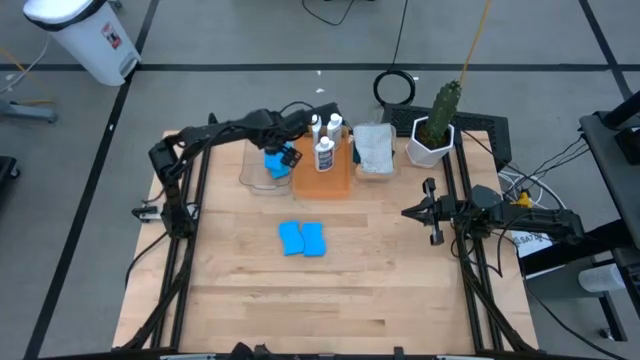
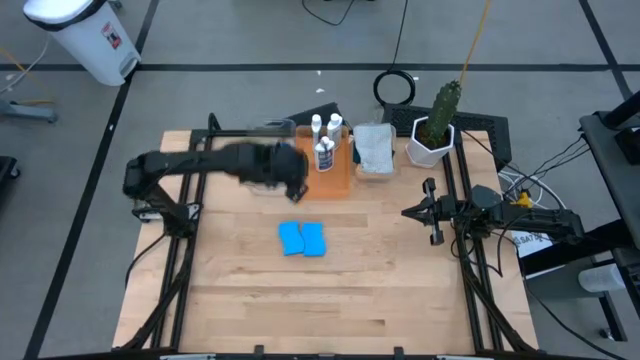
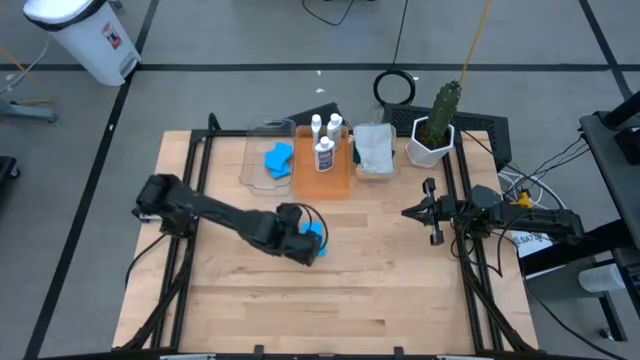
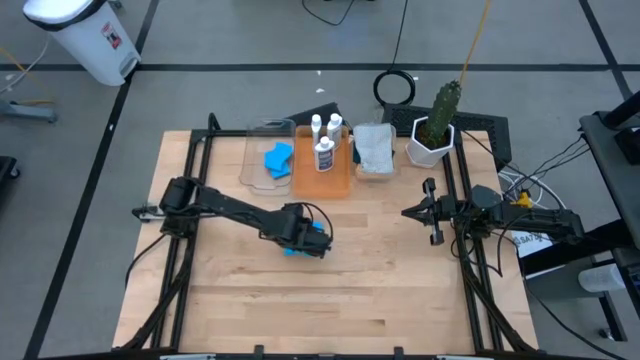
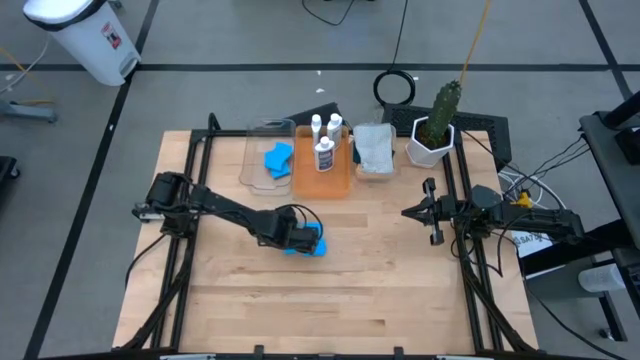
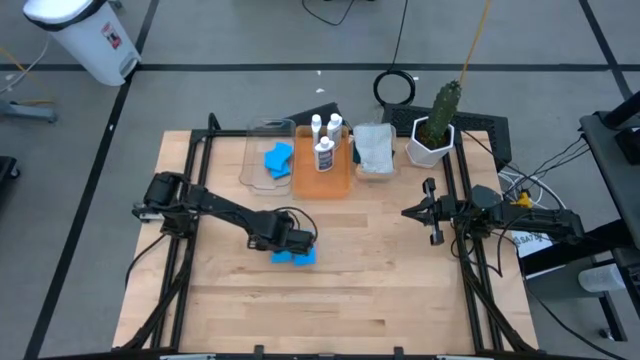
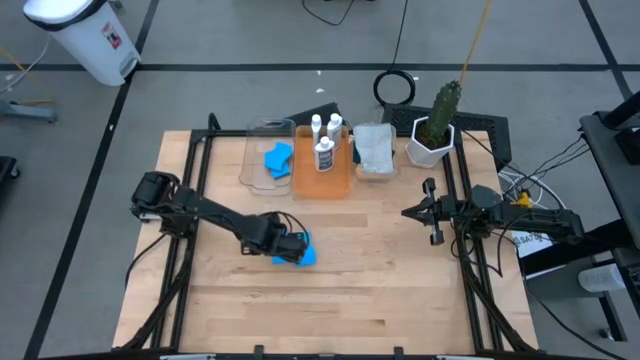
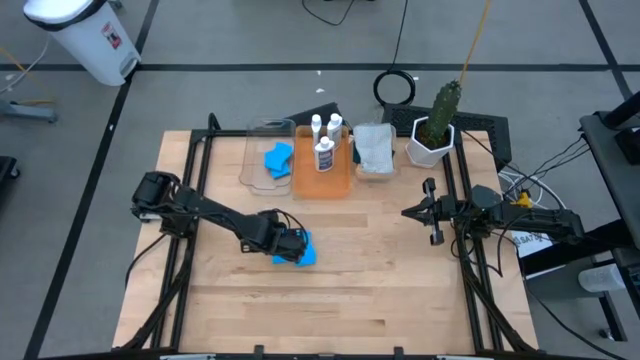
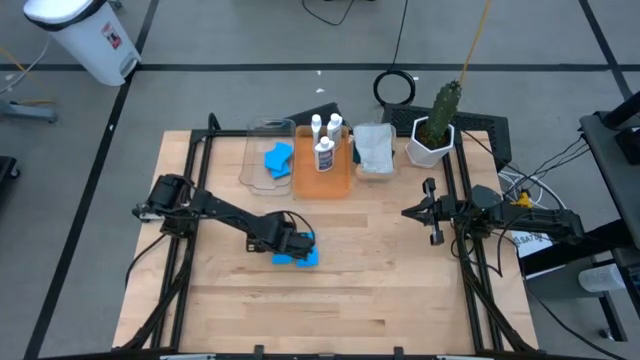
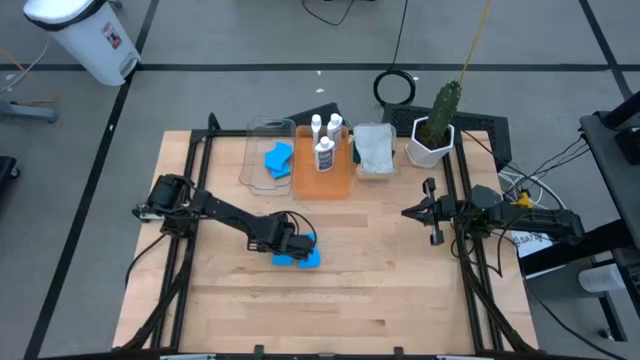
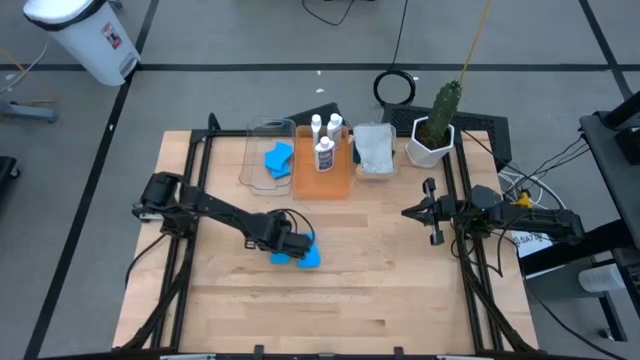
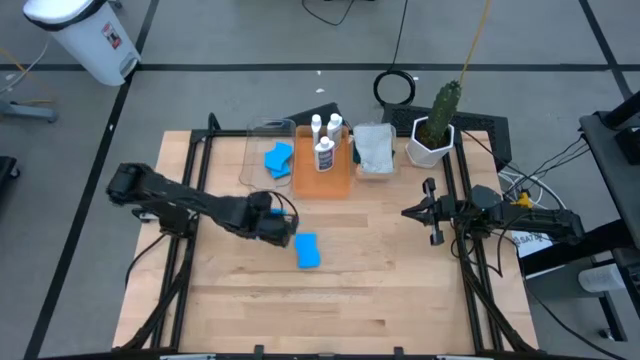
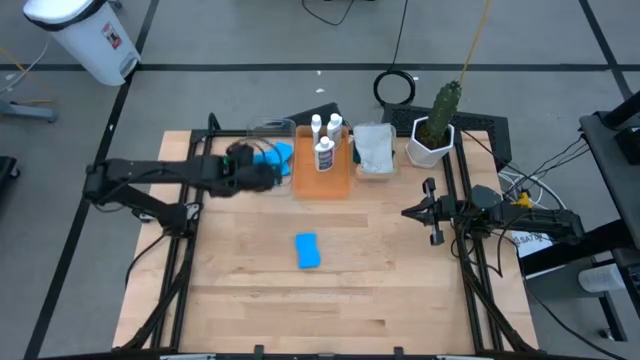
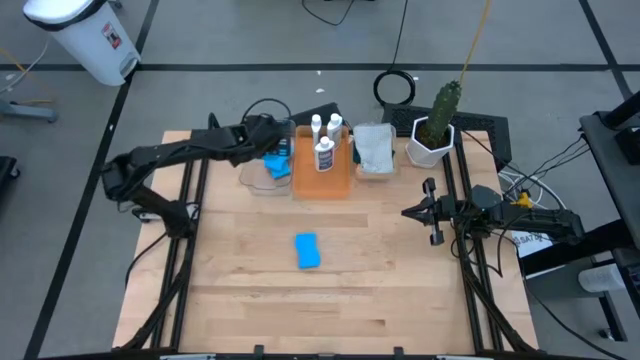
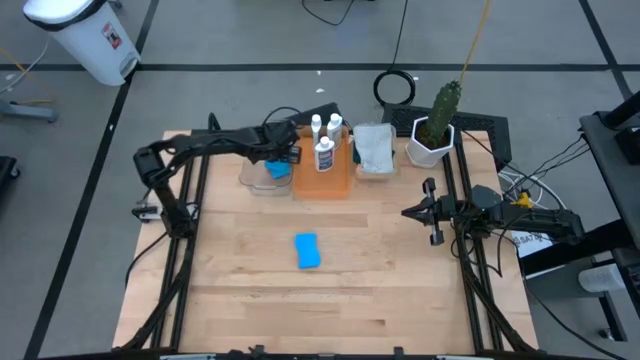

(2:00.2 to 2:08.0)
Task: Pick & Place Kitchen Items
Put the blue sponge into the transparent bin

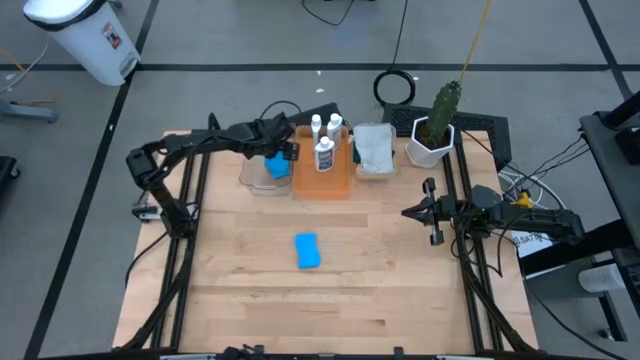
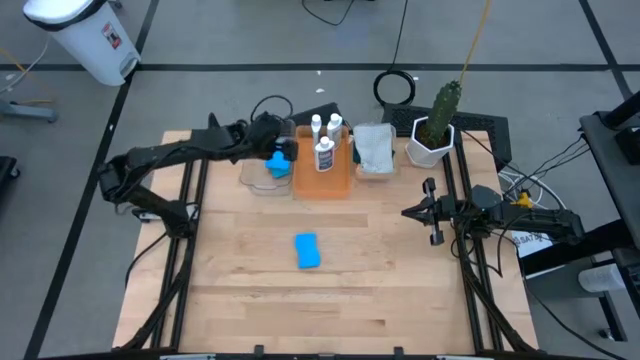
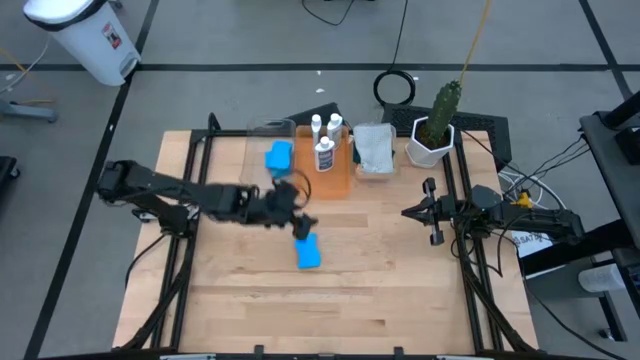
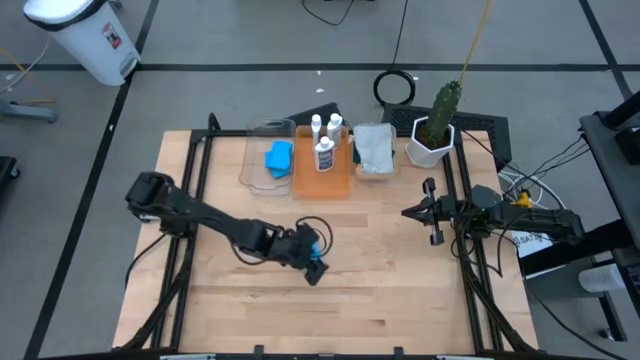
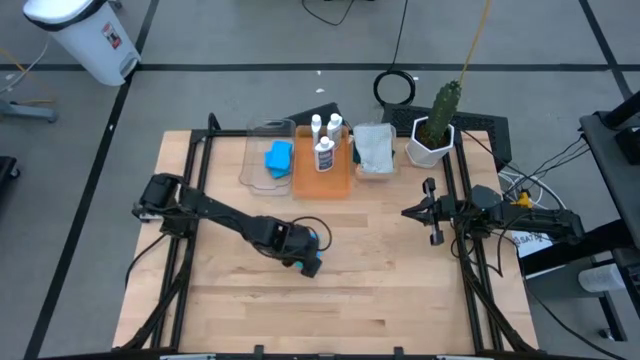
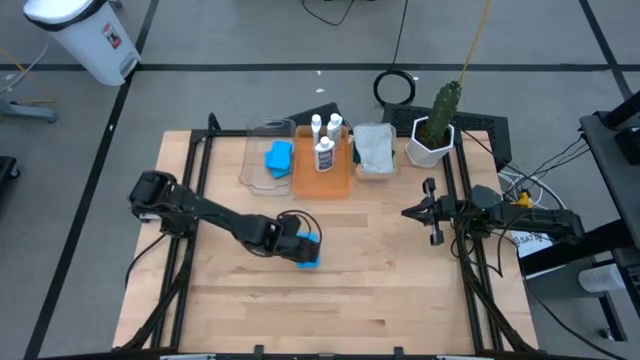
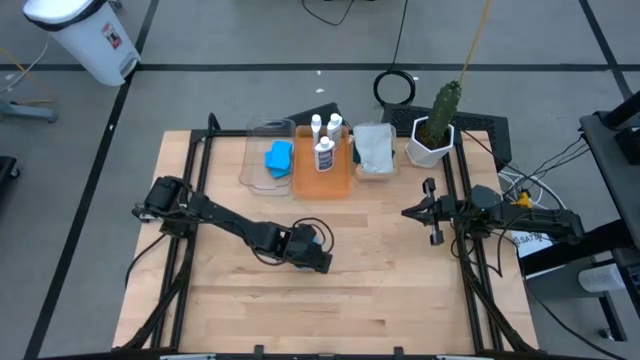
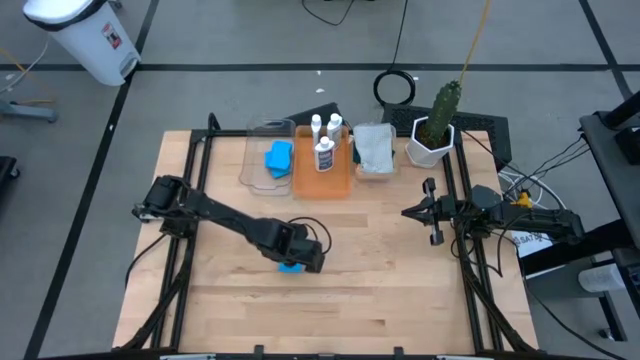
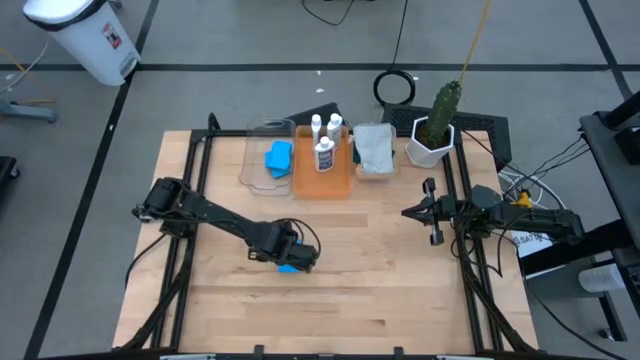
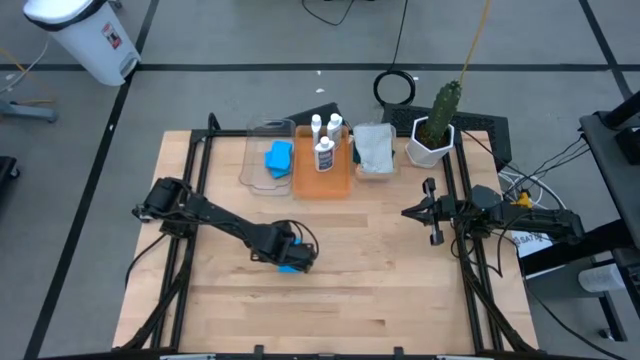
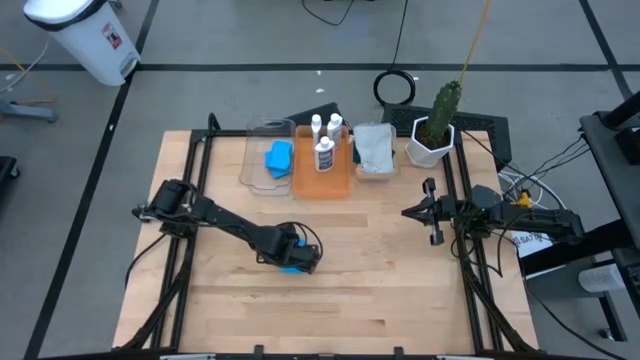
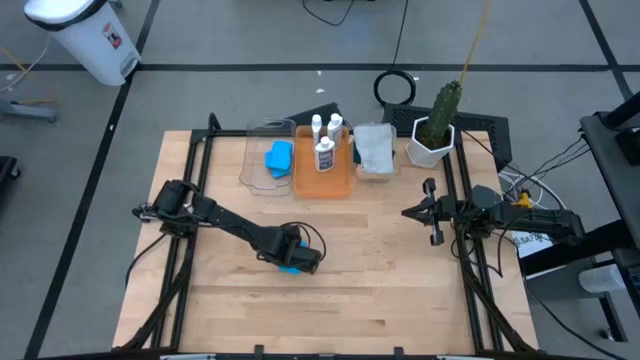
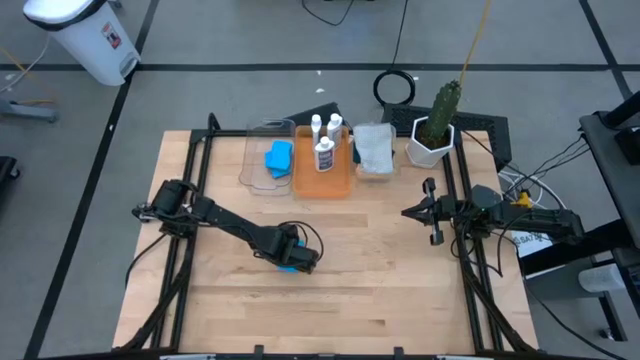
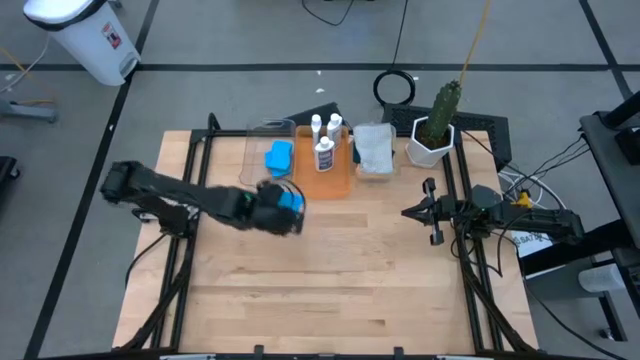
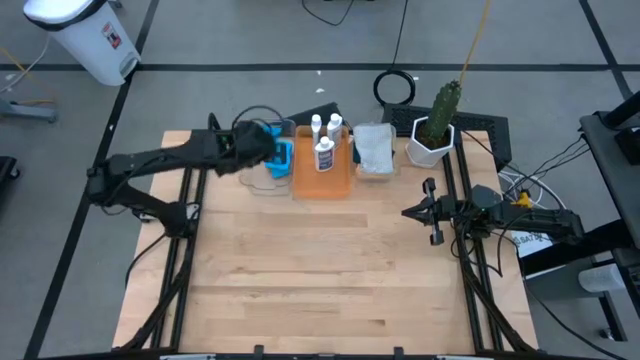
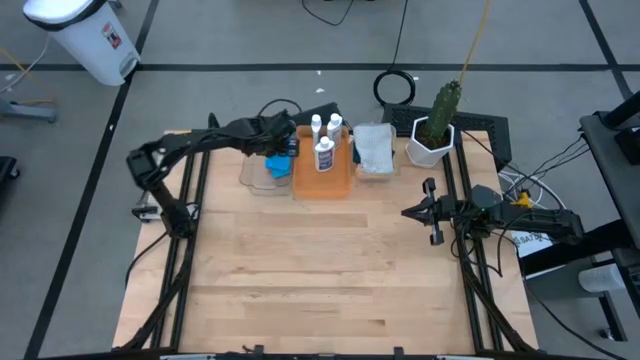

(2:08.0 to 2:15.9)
Put the blue sponge into the transparent bin

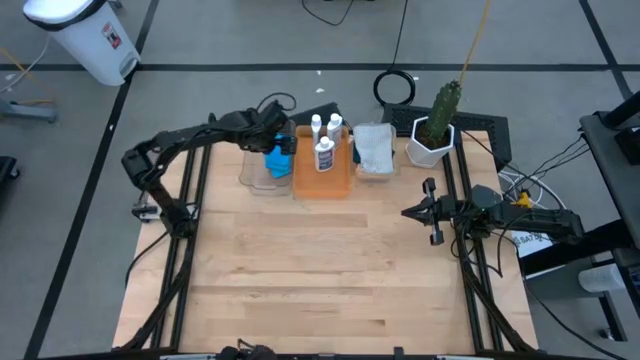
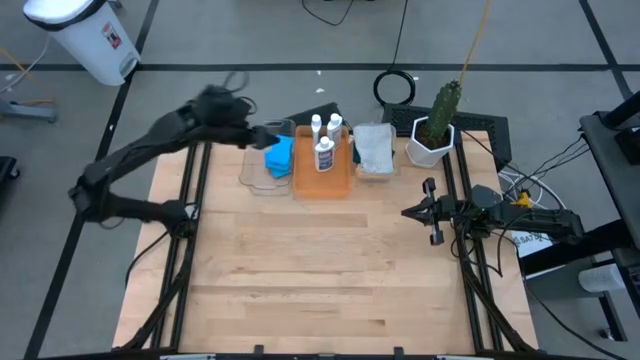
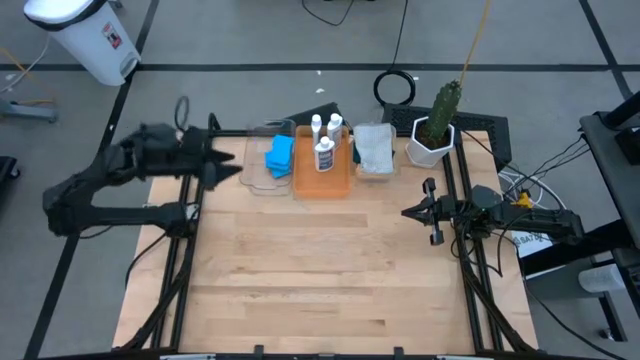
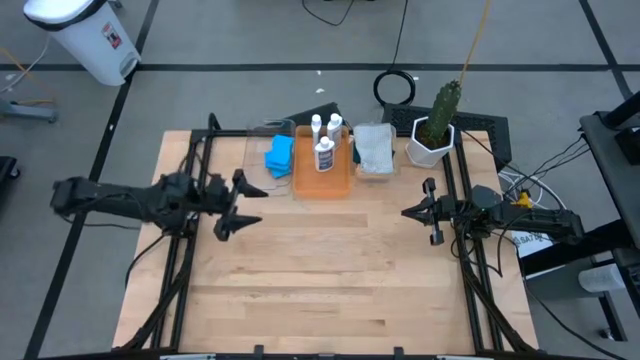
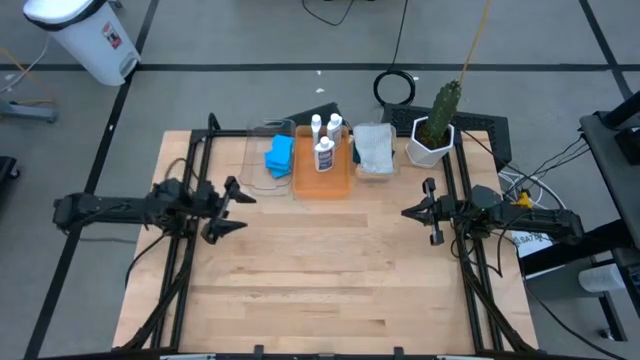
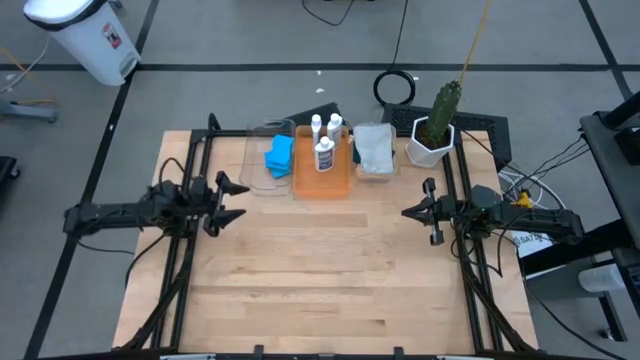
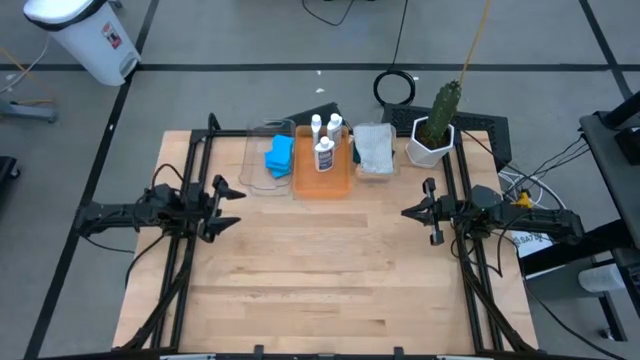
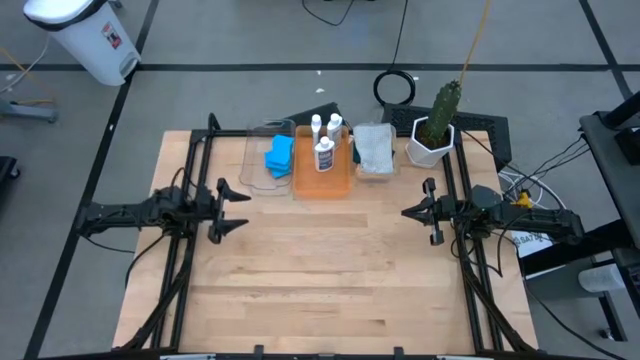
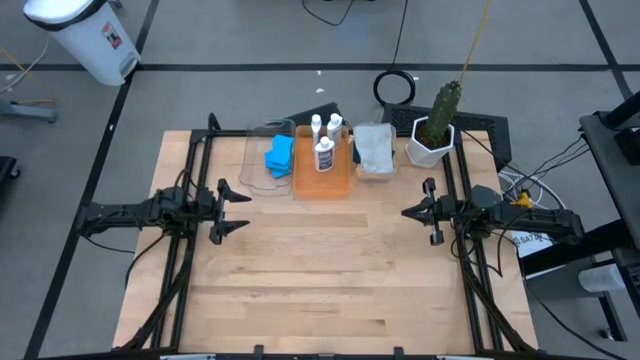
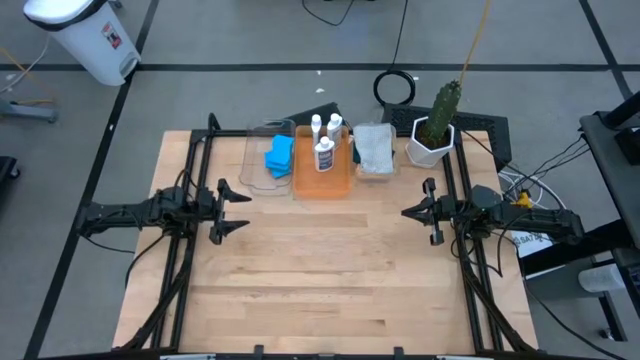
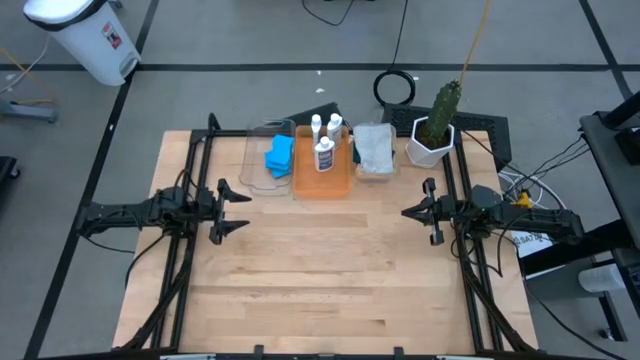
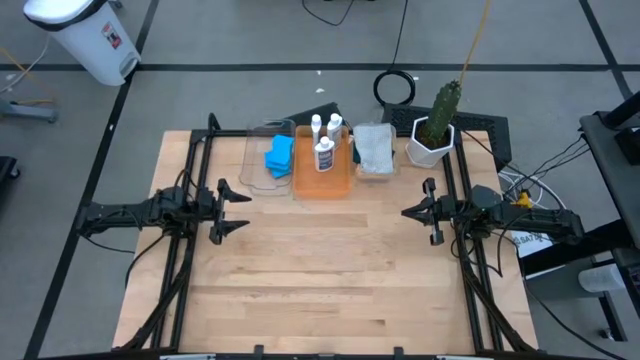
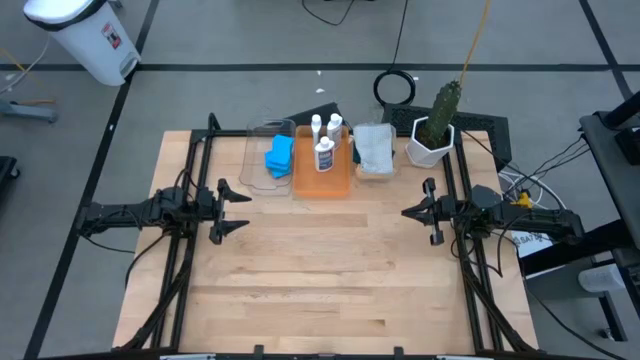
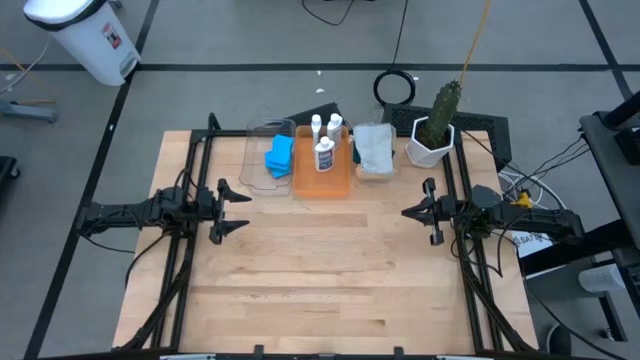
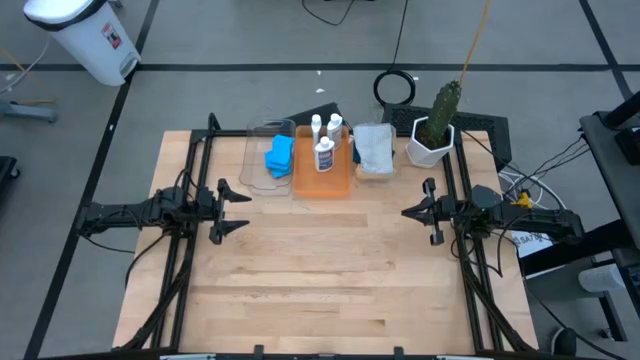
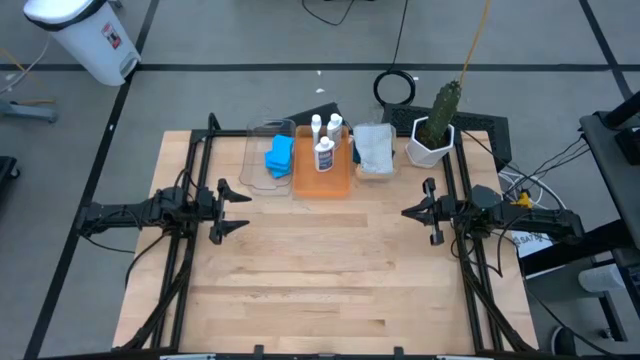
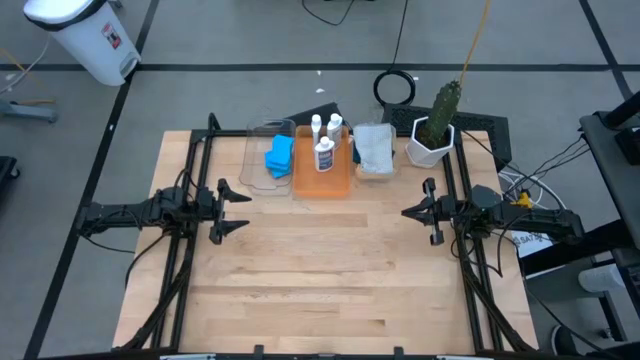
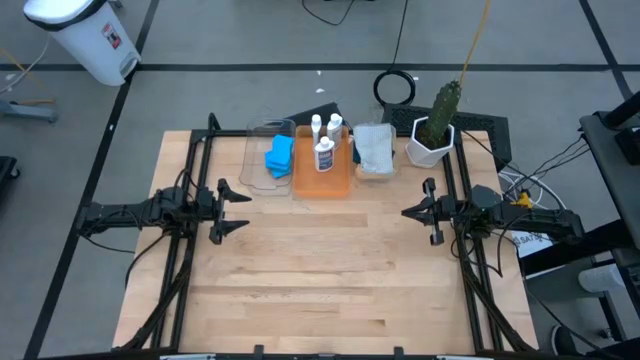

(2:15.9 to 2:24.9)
Return to Home Position
